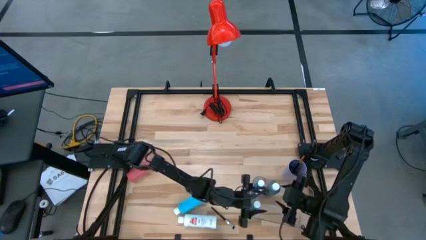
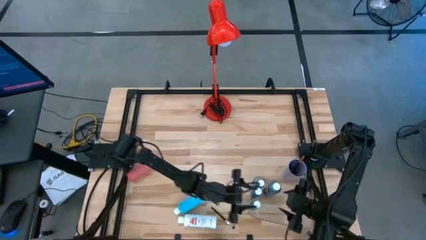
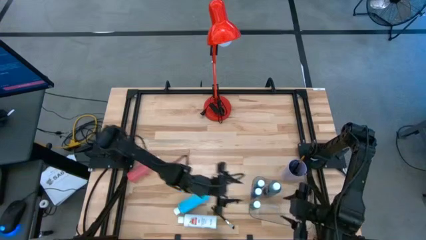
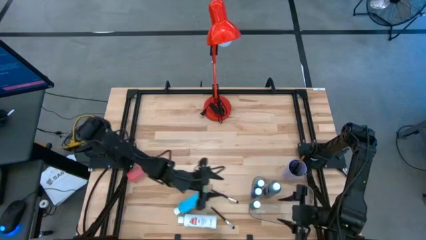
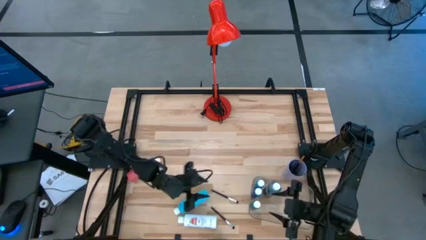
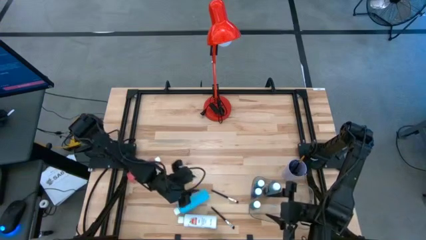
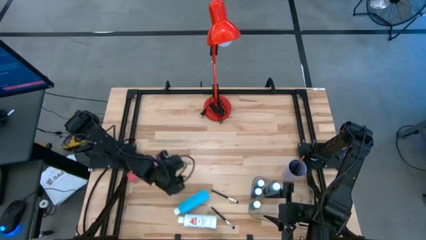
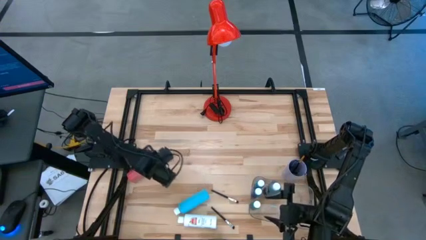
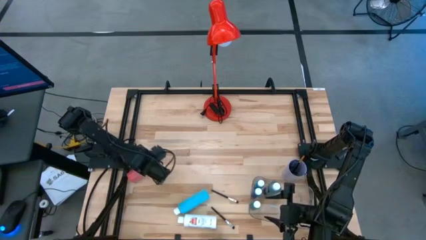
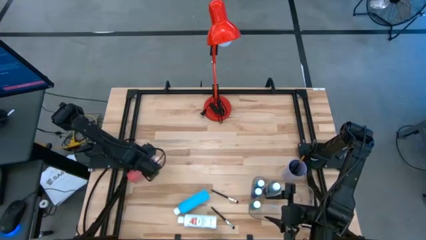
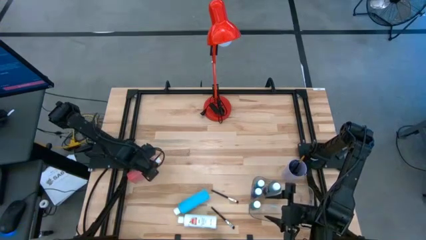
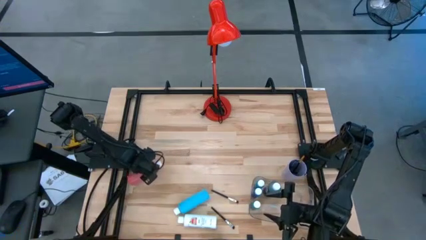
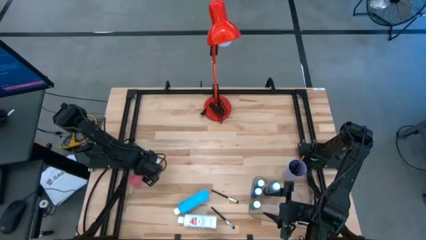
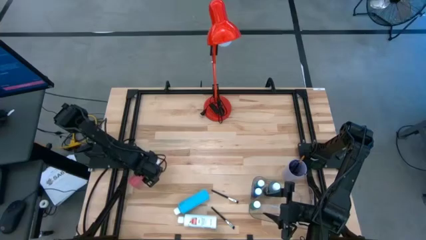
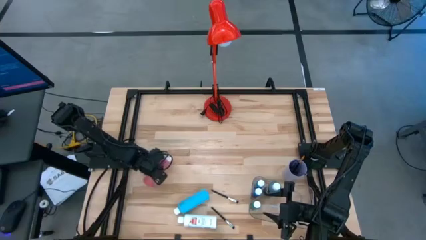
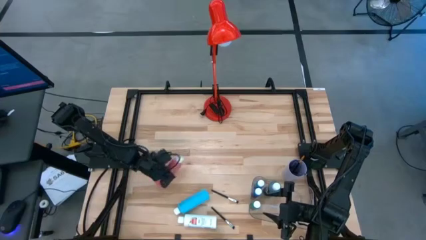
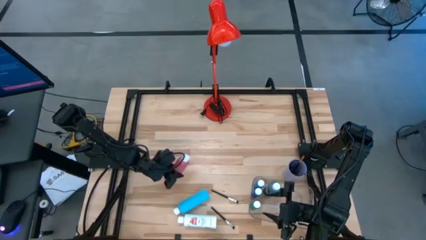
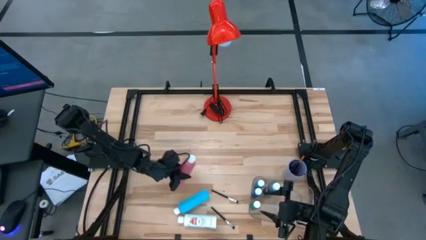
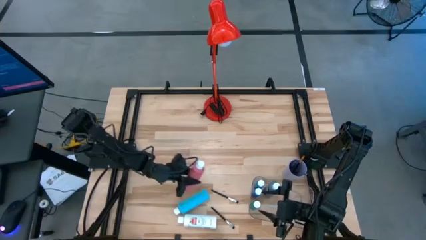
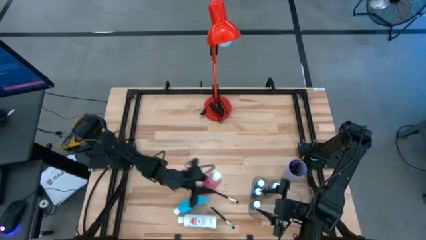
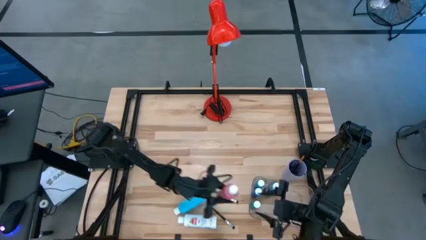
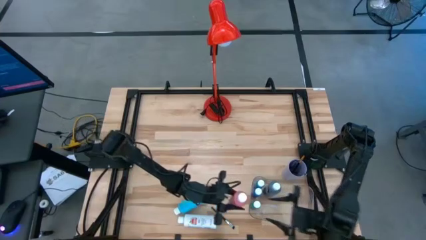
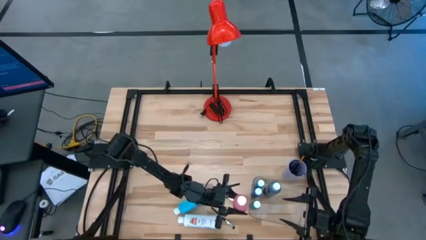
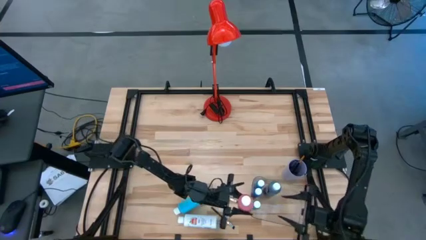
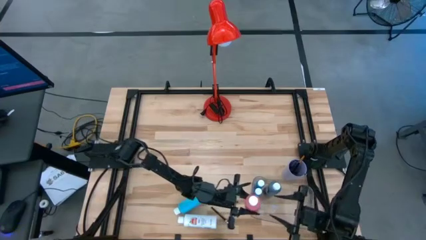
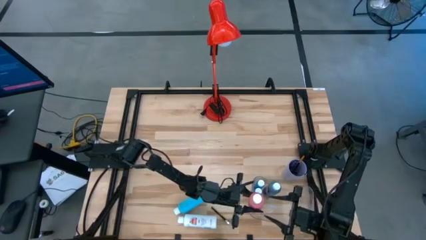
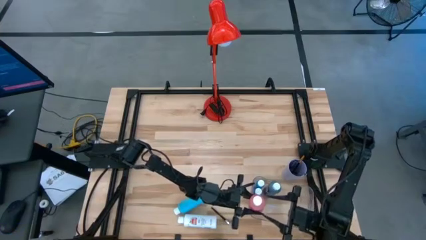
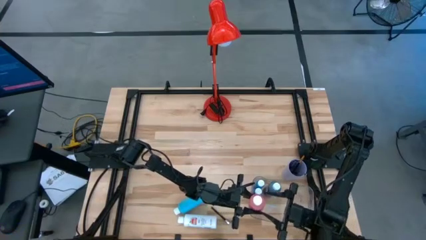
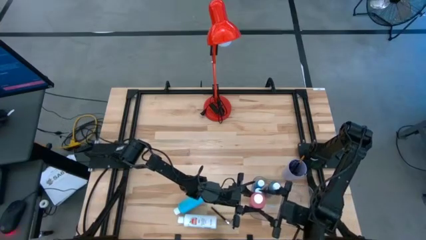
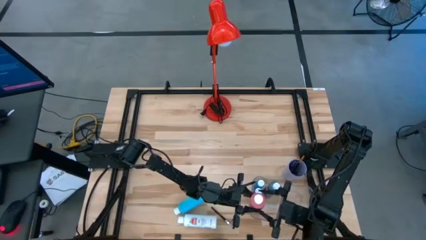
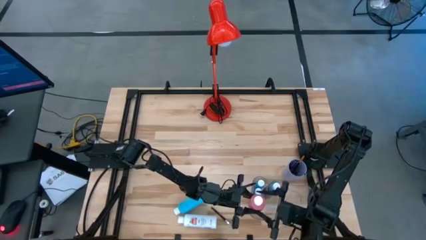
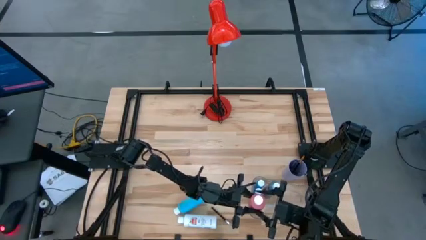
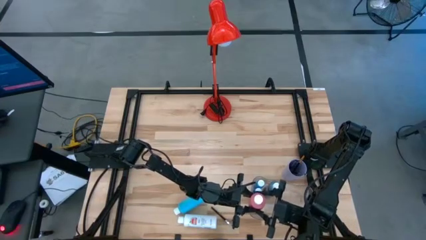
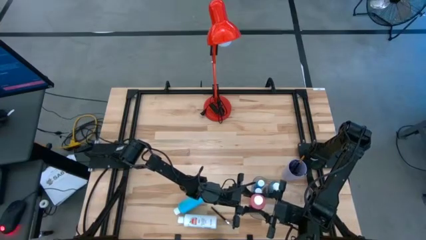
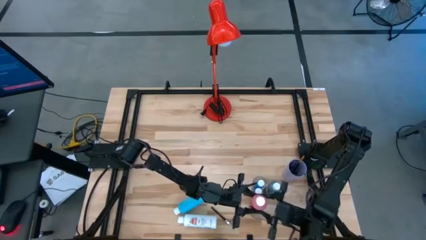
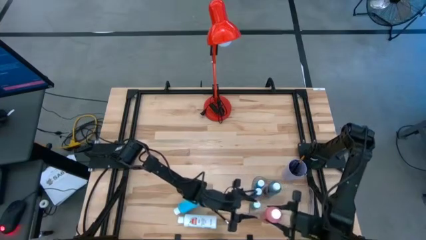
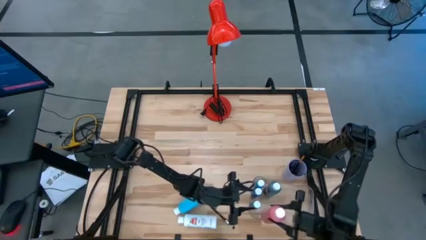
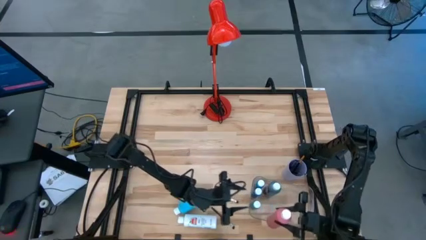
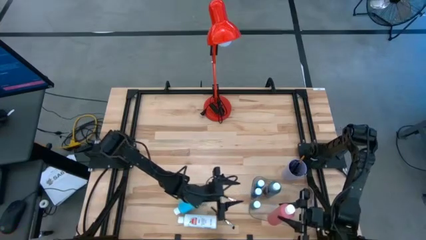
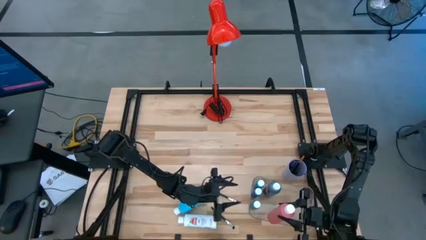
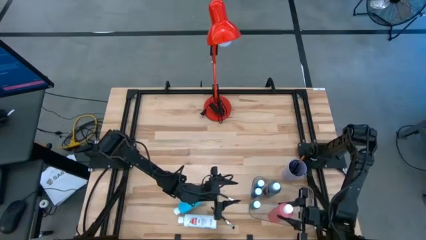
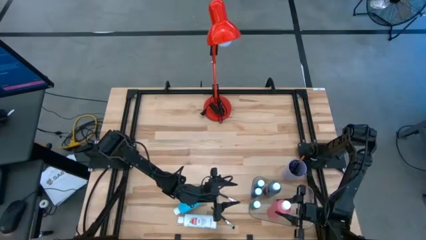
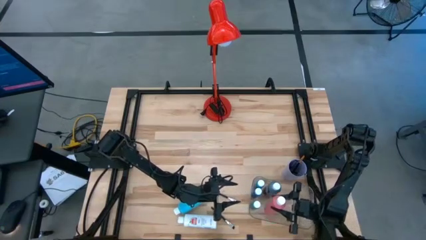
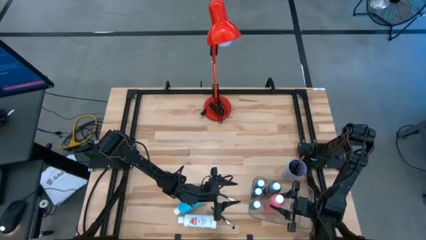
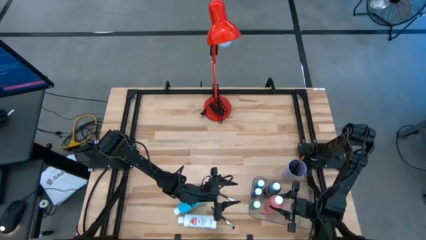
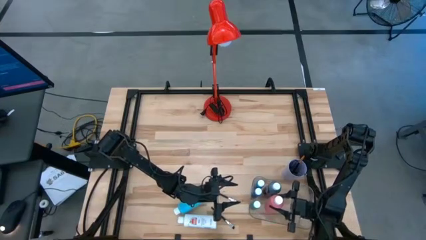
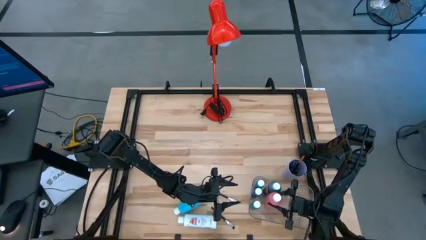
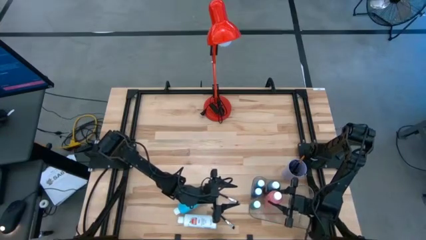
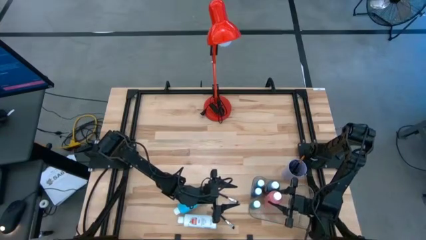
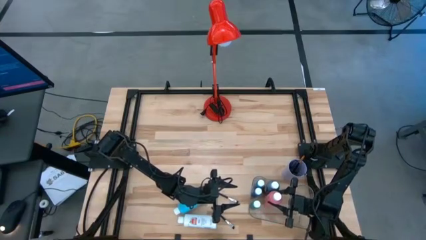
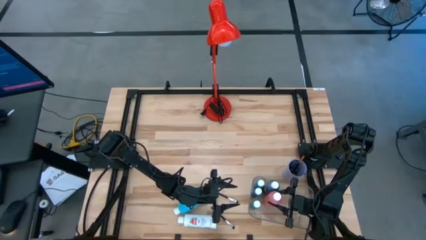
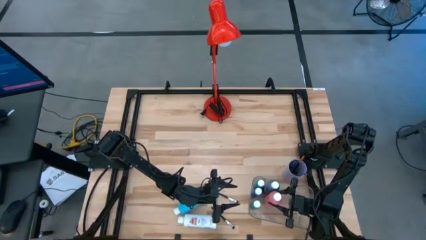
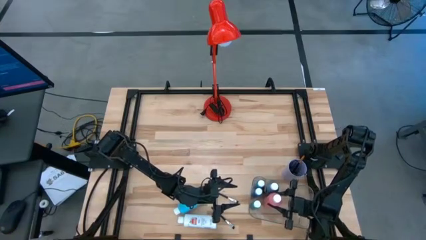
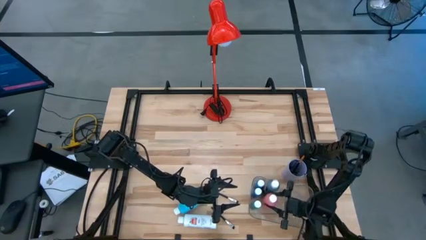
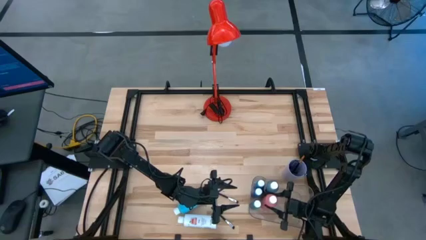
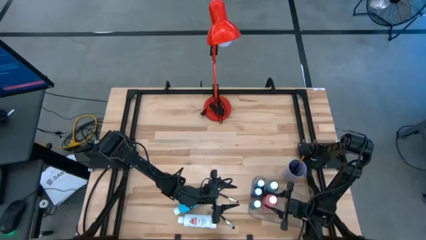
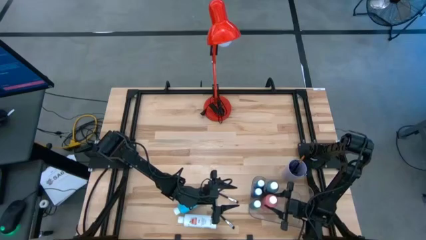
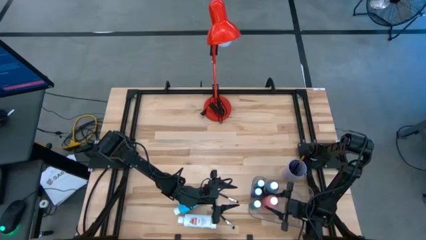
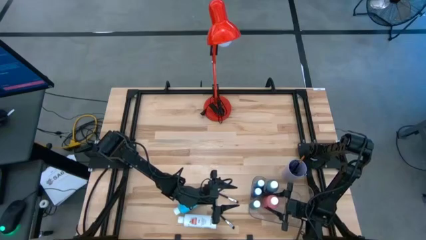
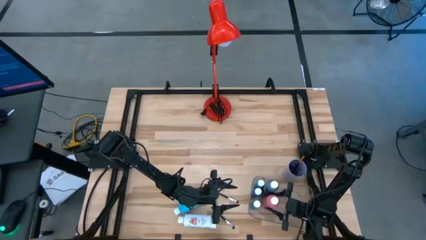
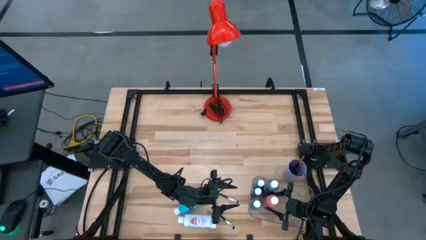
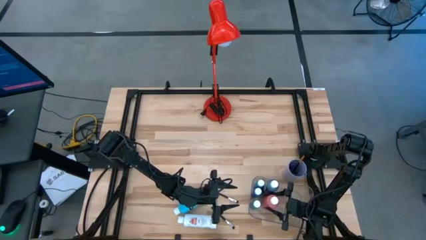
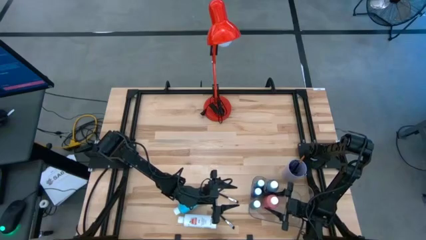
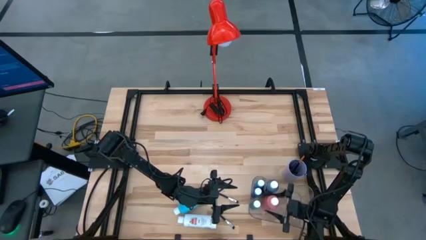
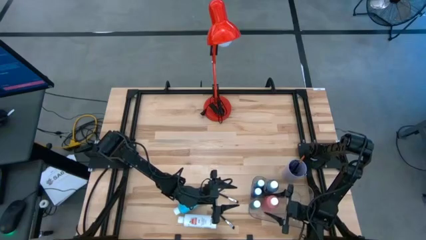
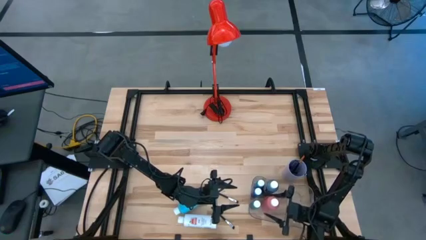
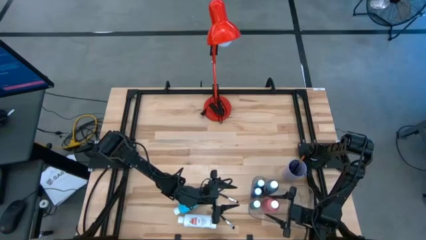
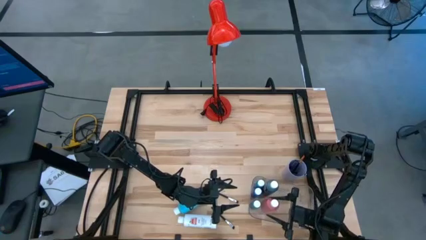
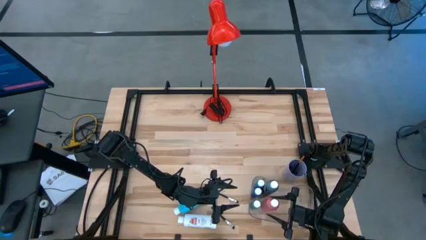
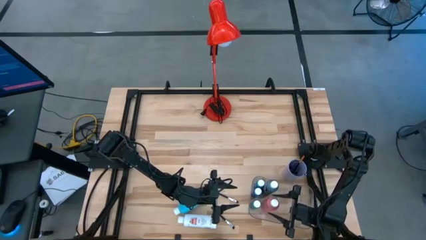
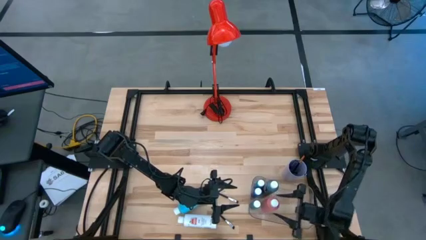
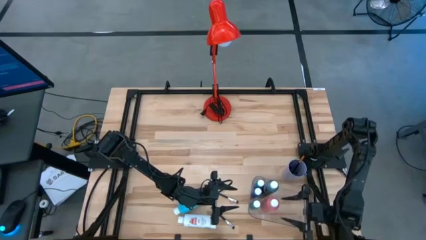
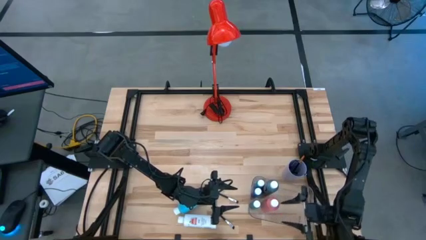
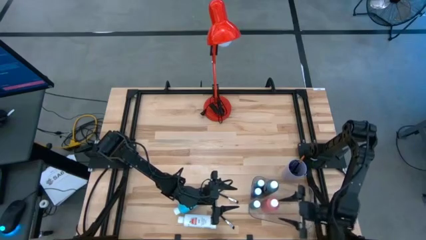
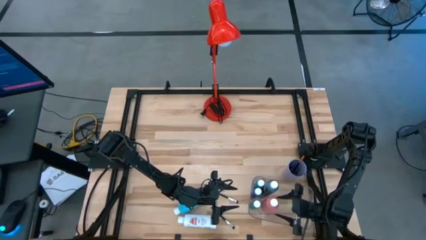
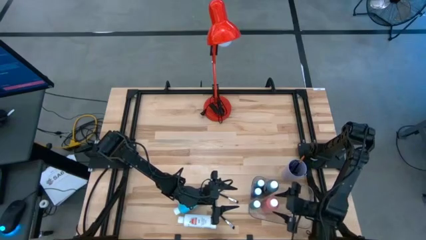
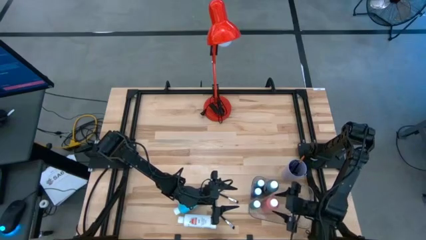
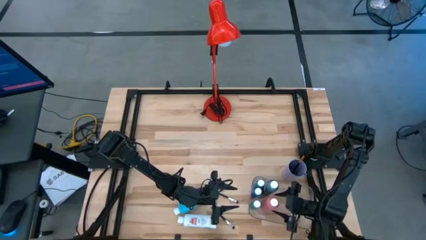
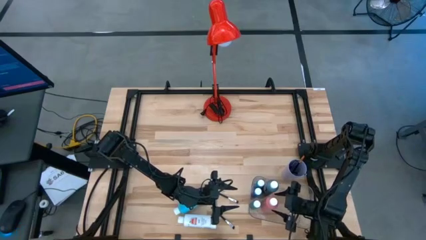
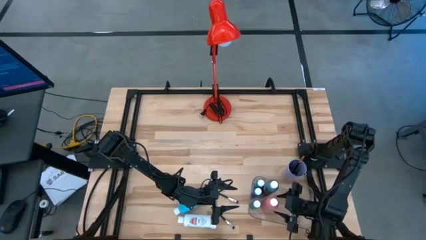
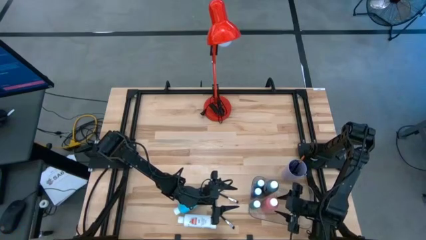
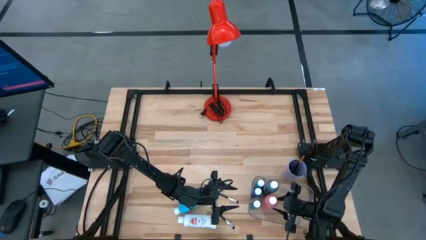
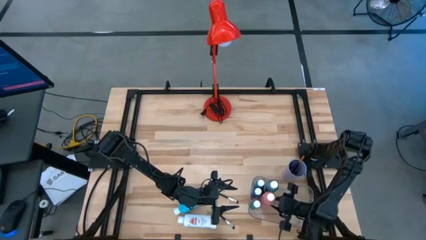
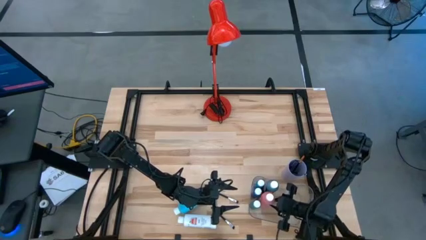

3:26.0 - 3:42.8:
Task: Pick & Place Paint Supplies
Put the pink paint bottle into the transparent bin

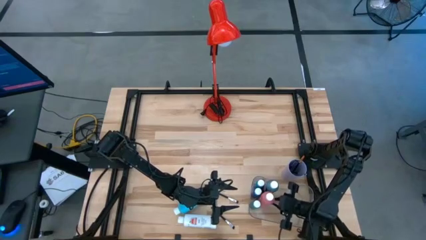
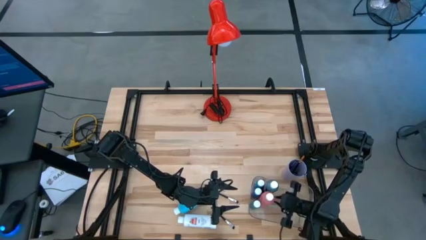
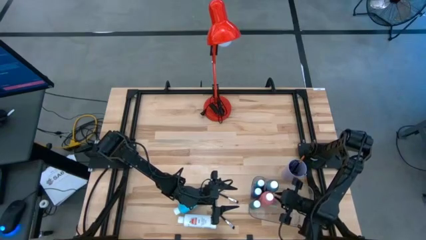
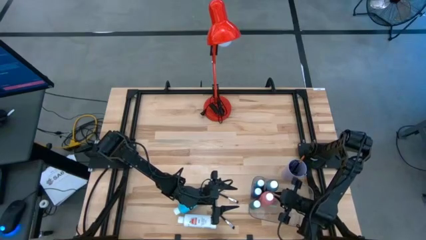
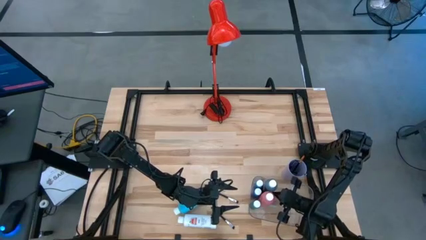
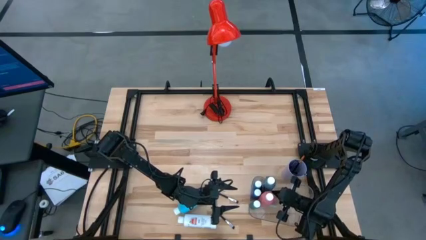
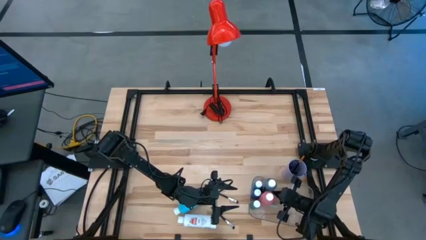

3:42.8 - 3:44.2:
Adjust the black paint bottle in the transparent bin
